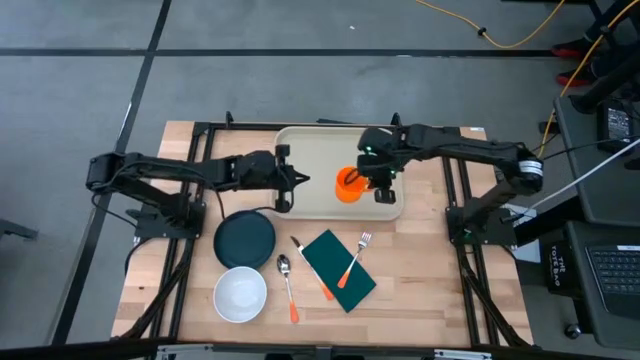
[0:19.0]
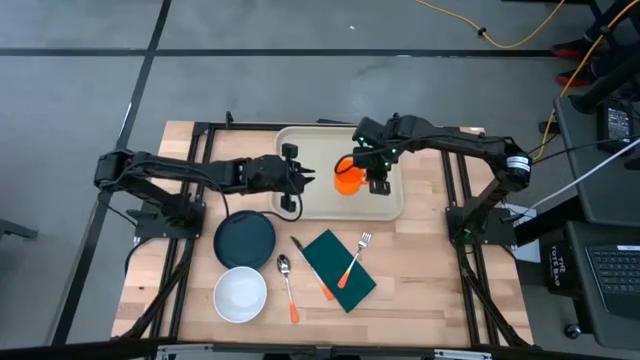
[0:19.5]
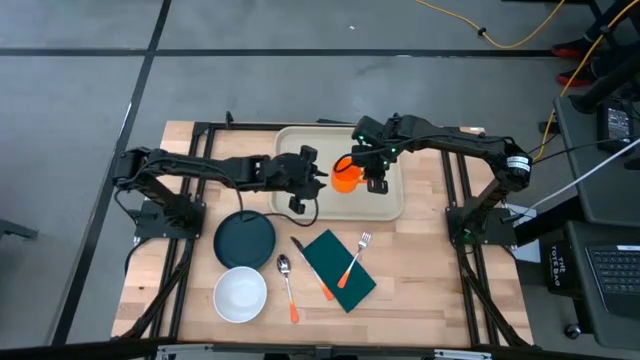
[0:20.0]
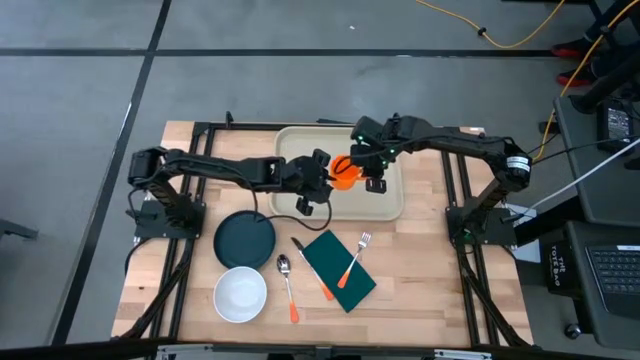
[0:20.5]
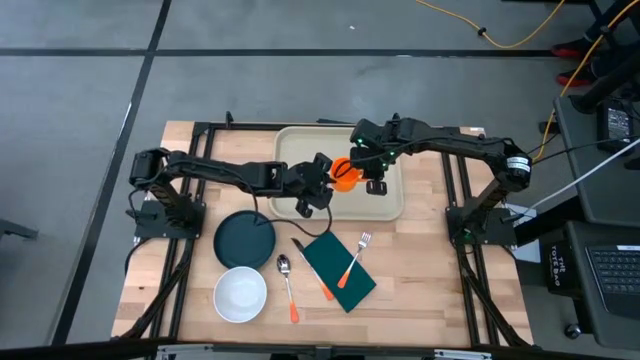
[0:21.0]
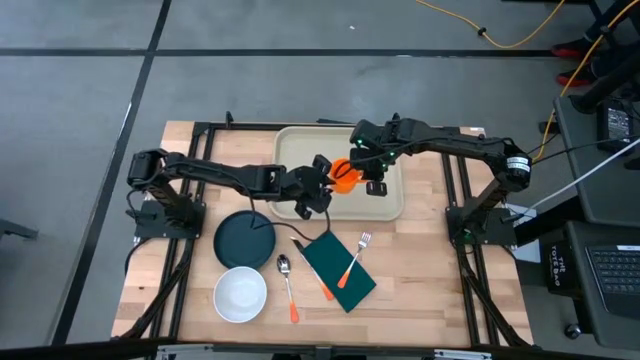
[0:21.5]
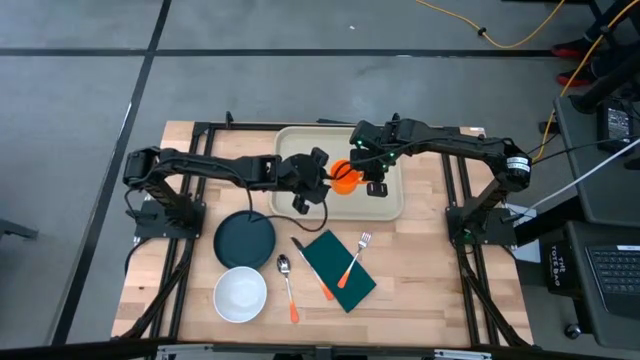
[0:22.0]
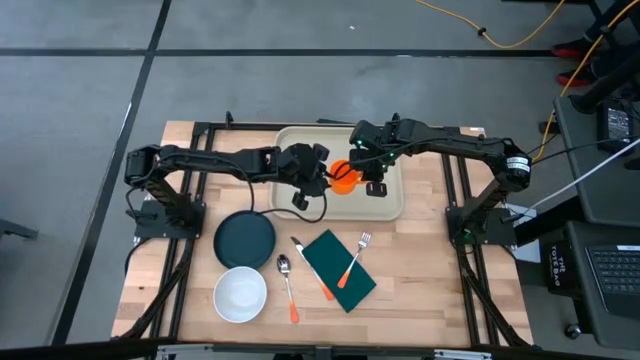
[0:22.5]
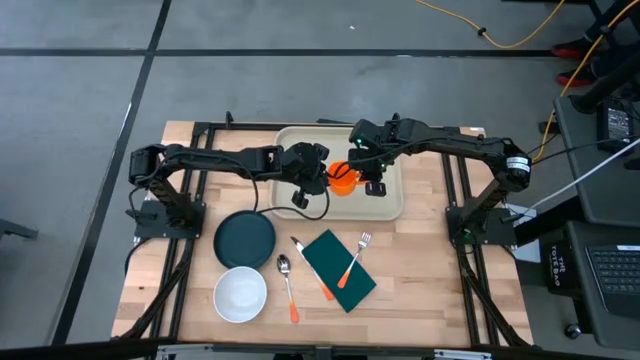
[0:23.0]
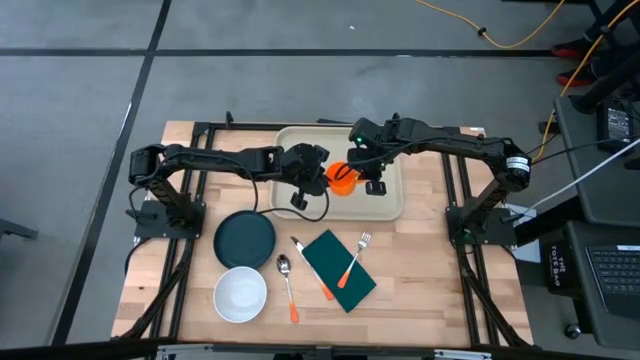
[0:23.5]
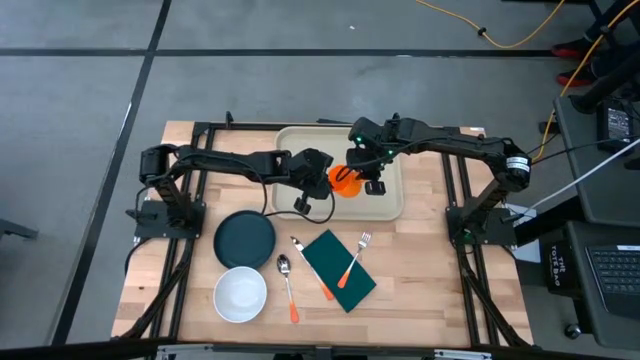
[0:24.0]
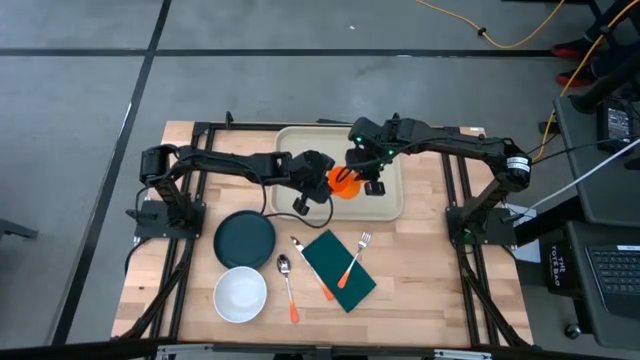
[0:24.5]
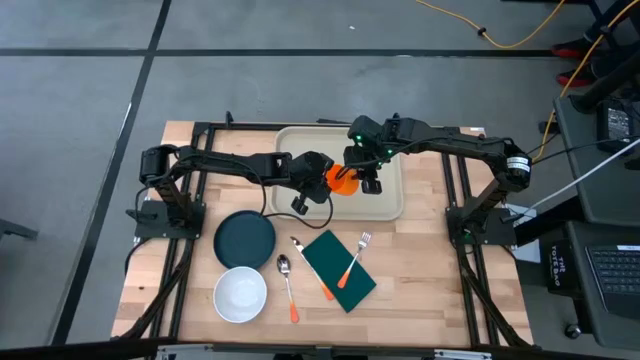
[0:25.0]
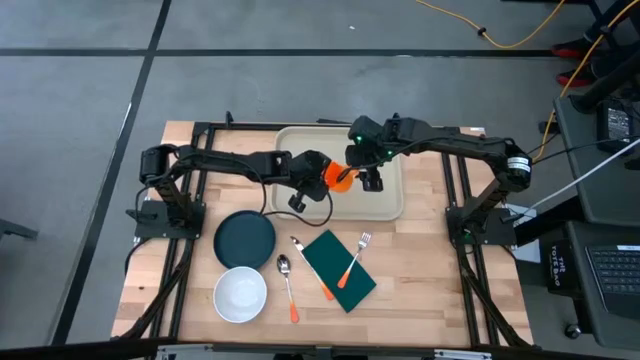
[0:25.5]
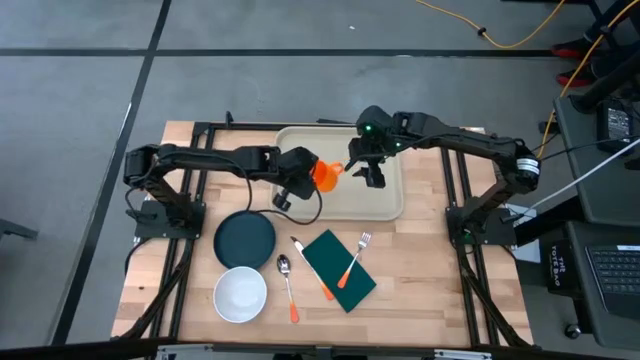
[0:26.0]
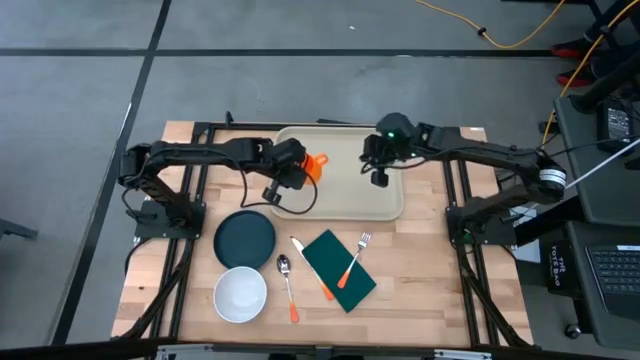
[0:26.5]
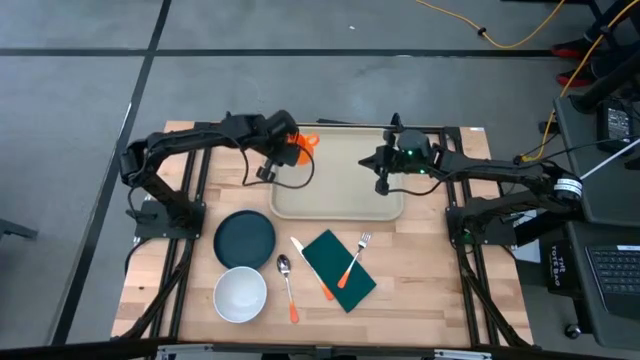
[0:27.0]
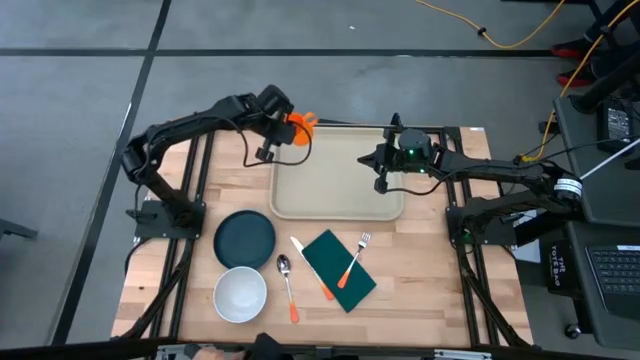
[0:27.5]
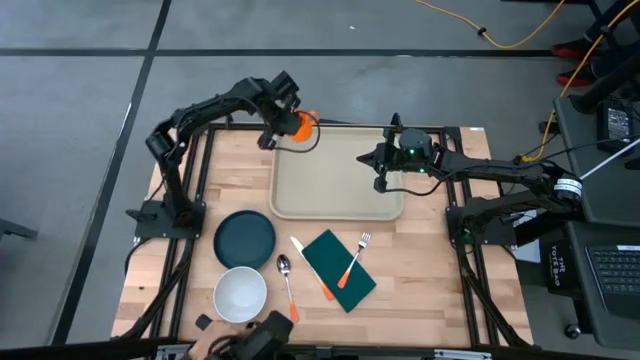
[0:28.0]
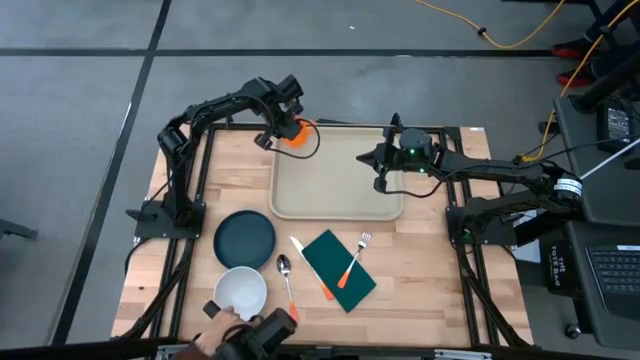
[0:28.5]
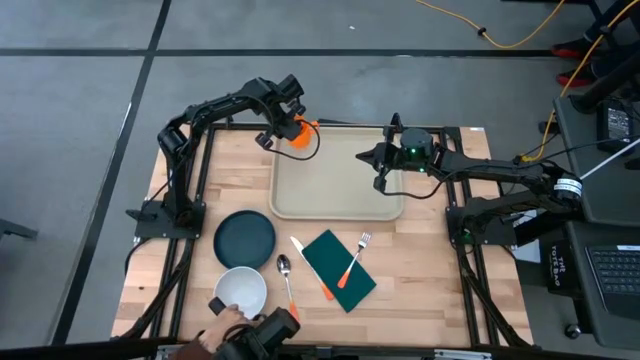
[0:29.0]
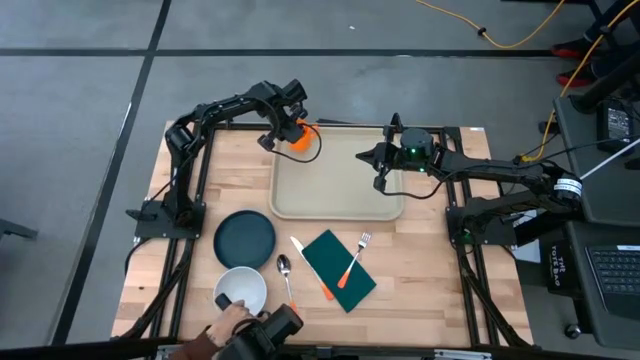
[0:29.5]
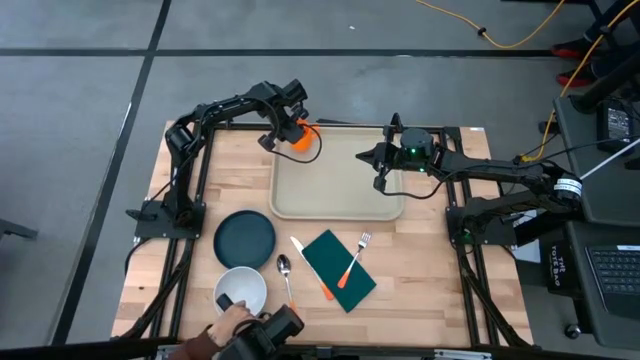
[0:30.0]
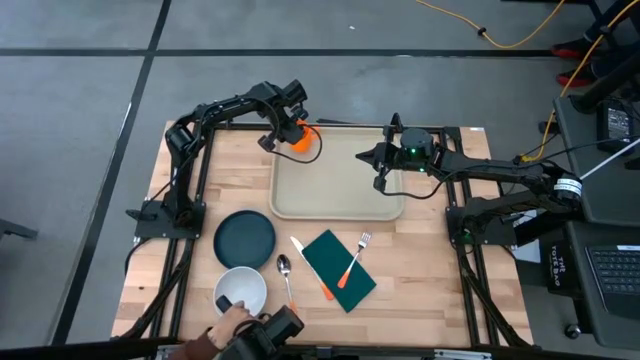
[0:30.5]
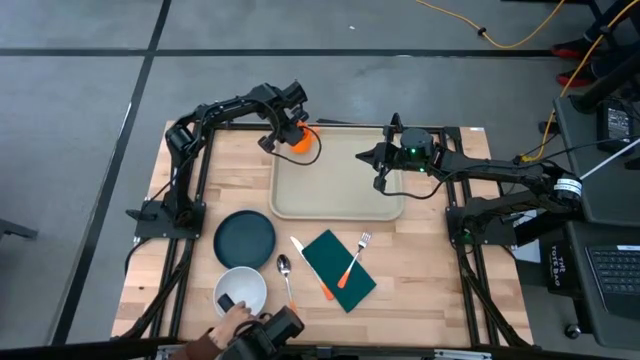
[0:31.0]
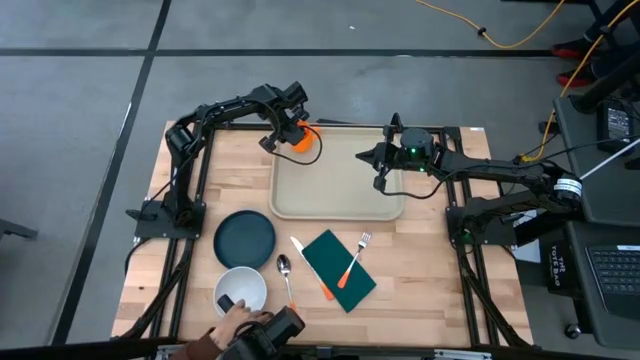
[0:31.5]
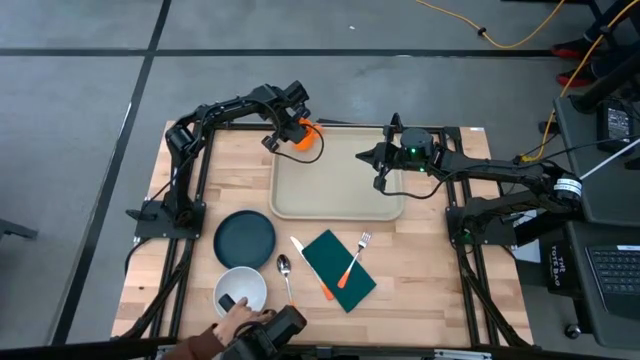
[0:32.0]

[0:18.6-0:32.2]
Task: Set up tray
Put the orange cup on the gray tray

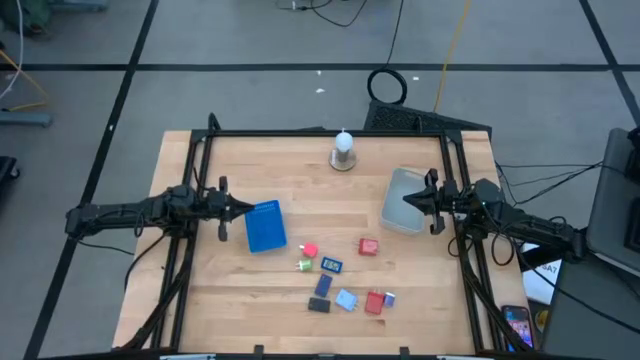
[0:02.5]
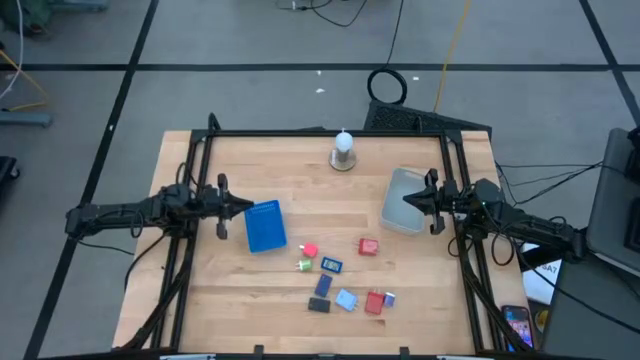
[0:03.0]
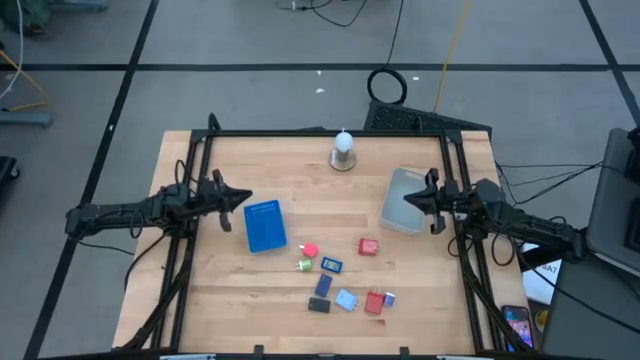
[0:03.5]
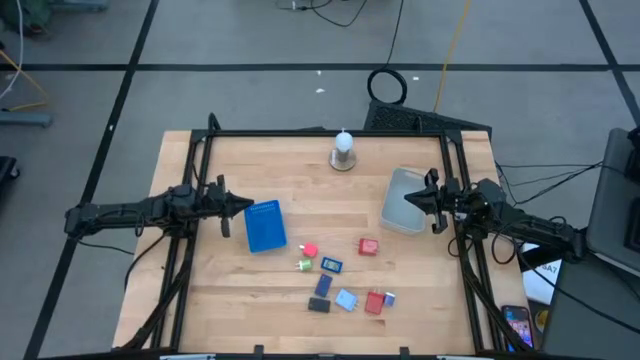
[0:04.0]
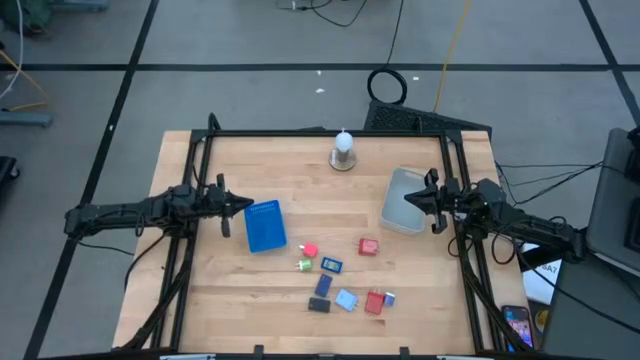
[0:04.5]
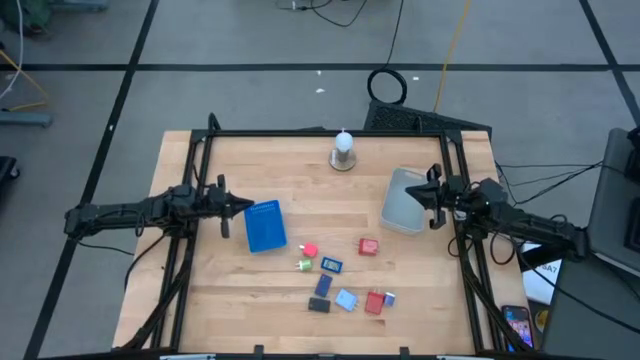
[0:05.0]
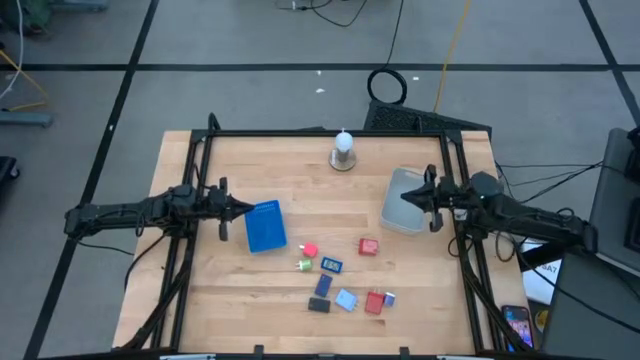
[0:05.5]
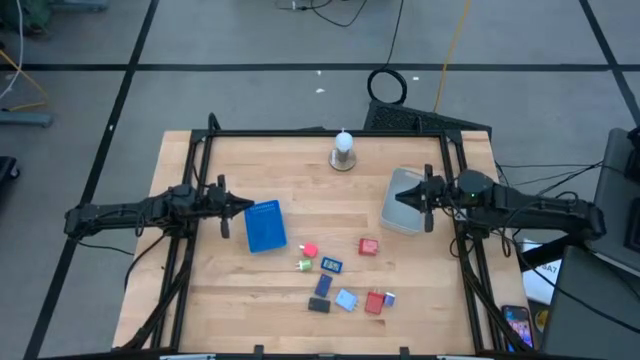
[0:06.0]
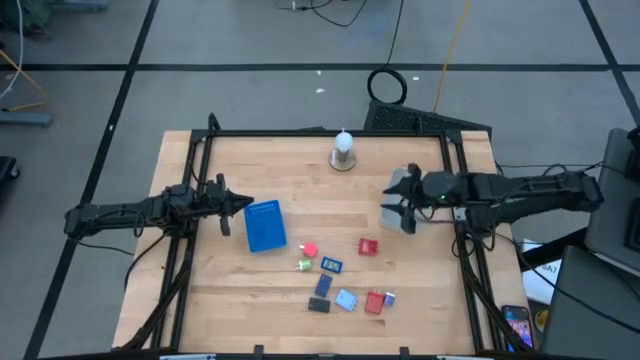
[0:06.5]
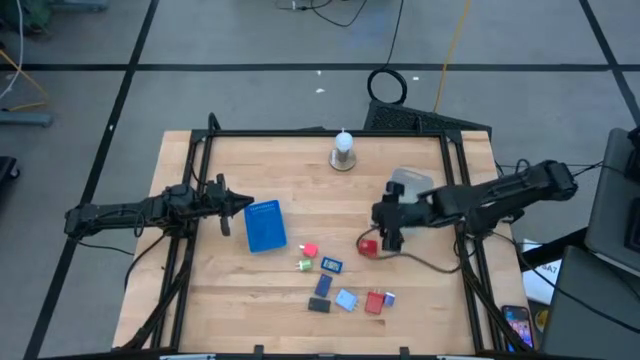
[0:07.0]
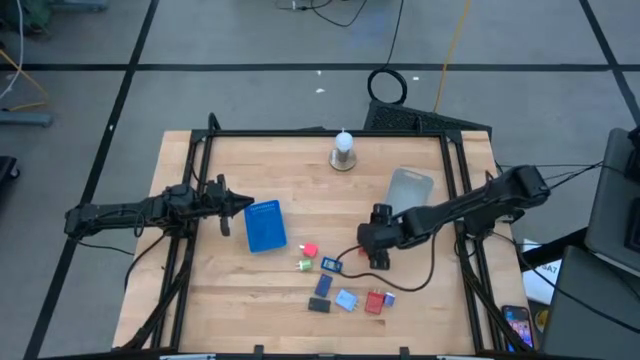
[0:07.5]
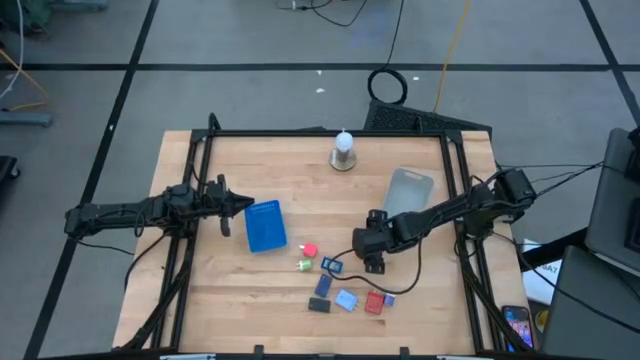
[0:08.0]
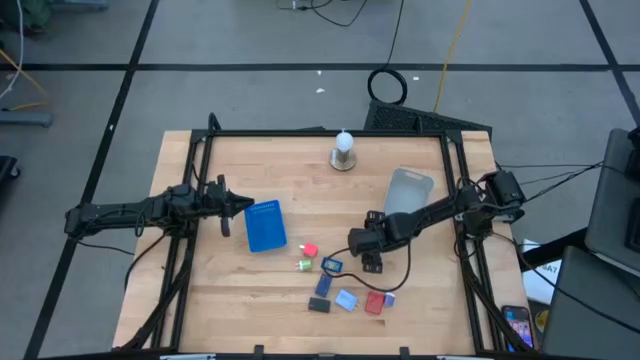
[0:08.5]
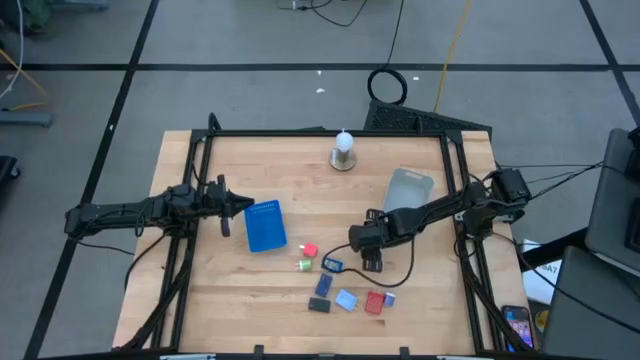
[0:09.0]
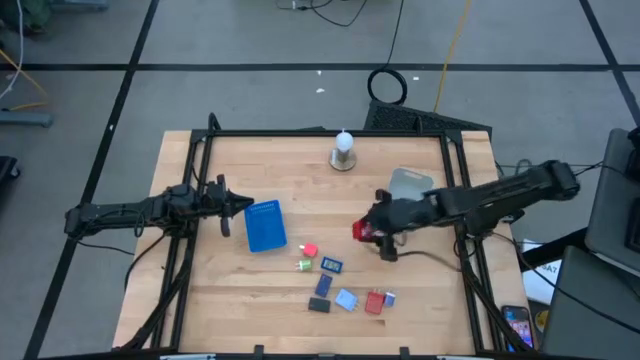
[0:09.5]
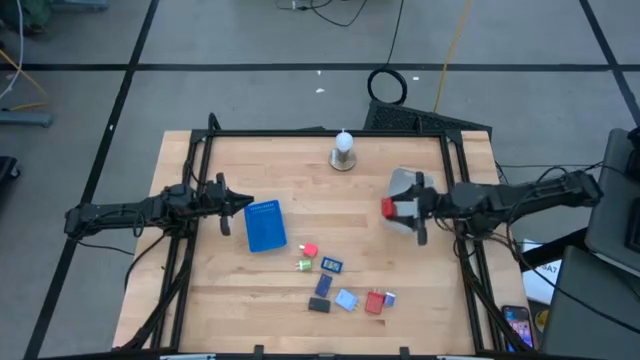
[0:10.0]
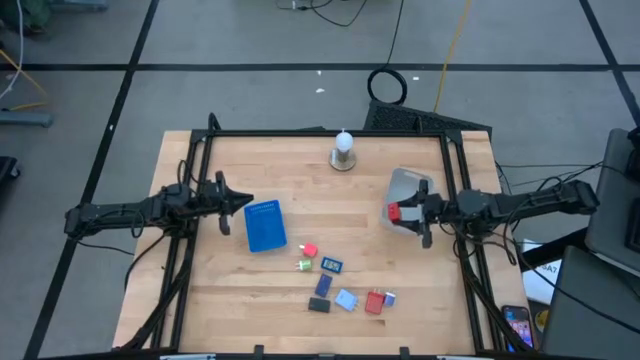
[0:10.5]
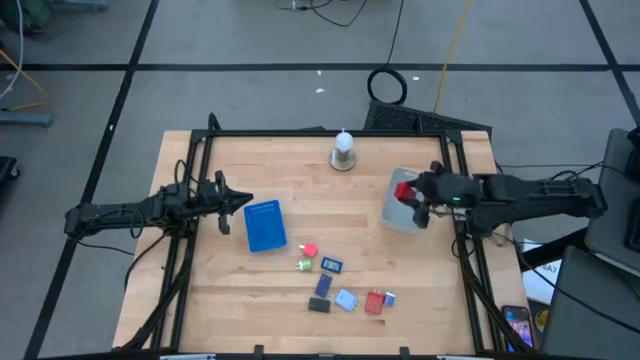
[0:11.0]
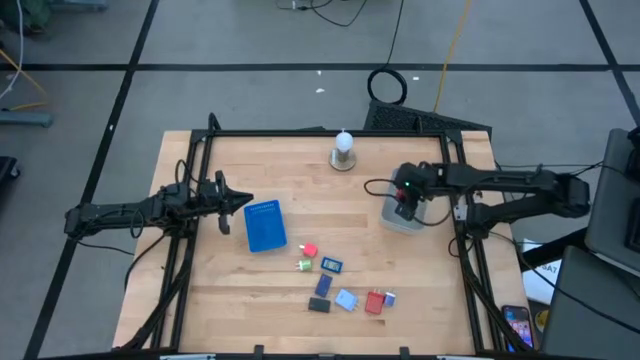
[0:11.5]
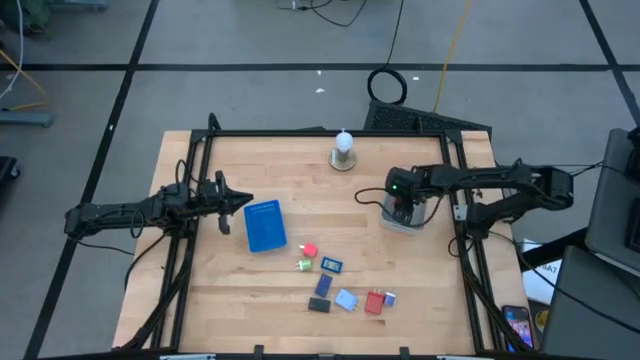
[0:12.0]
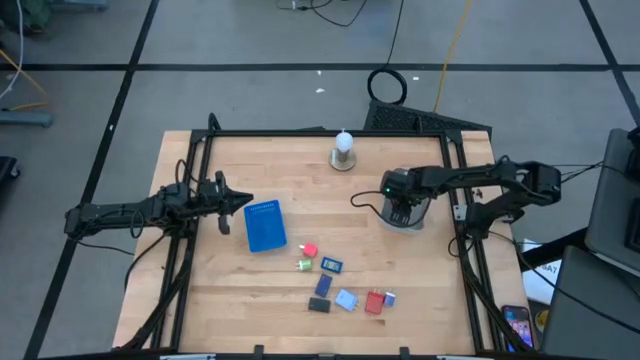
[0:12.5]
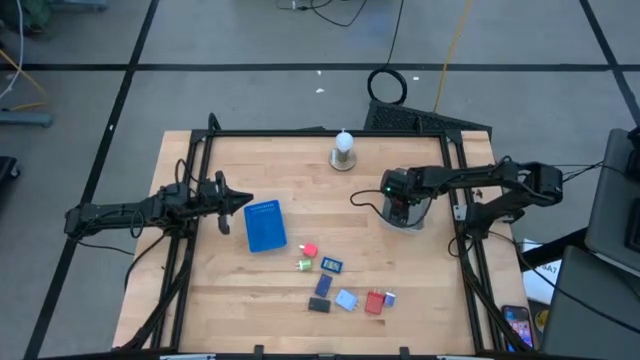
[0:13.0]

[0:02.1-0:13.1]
Task: Pick & Place Office items
Put the top red charger adapter into the gray bin
